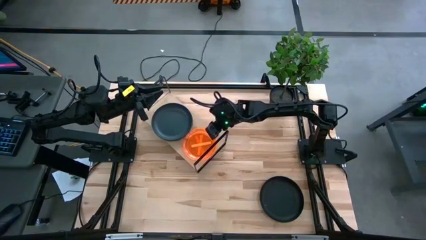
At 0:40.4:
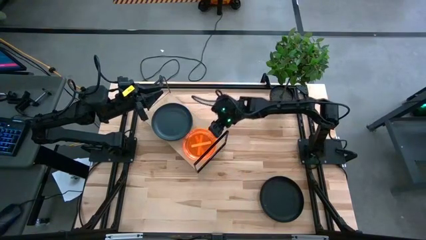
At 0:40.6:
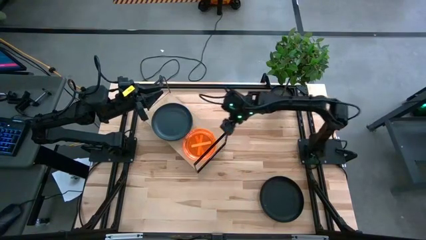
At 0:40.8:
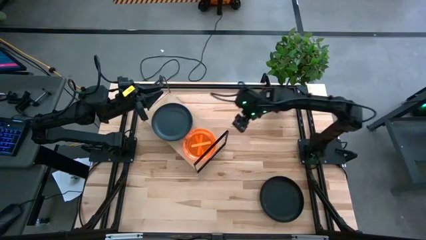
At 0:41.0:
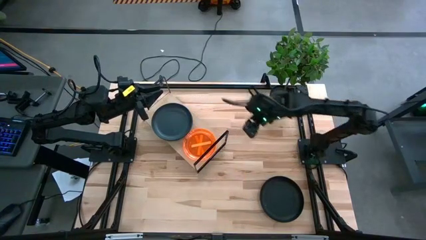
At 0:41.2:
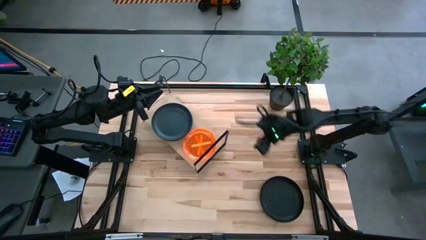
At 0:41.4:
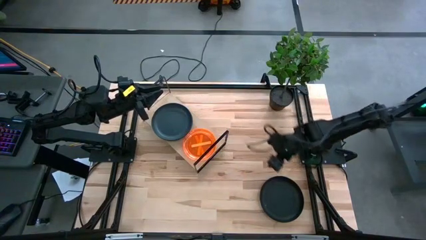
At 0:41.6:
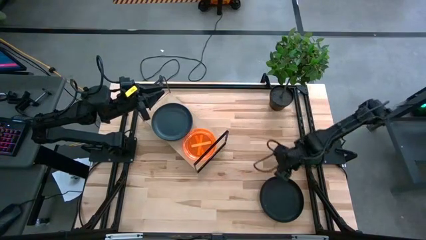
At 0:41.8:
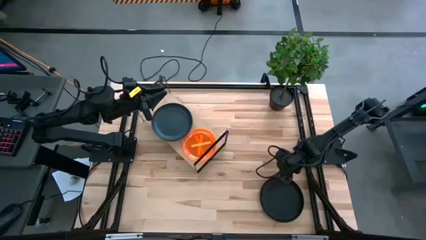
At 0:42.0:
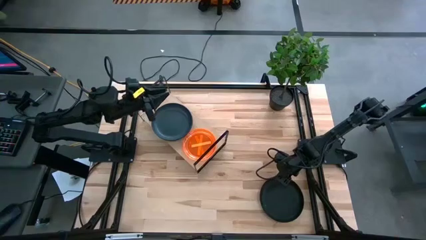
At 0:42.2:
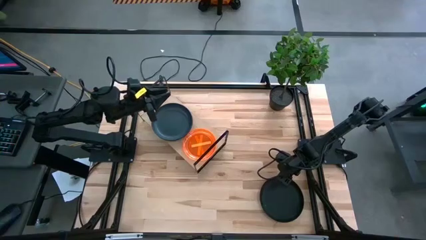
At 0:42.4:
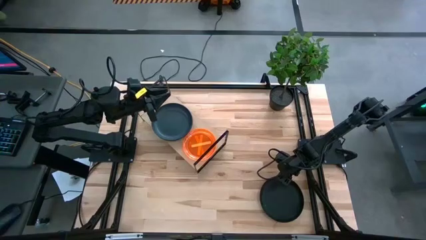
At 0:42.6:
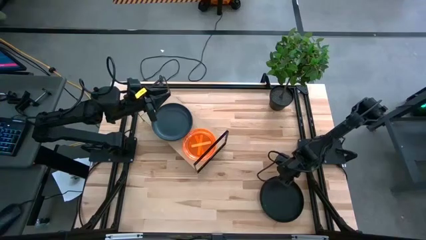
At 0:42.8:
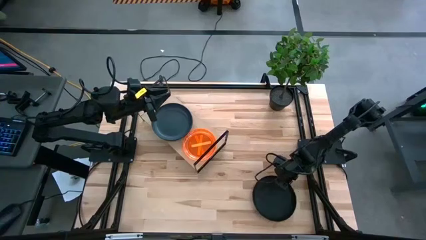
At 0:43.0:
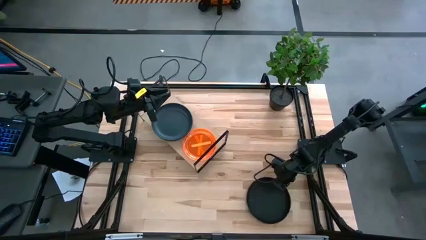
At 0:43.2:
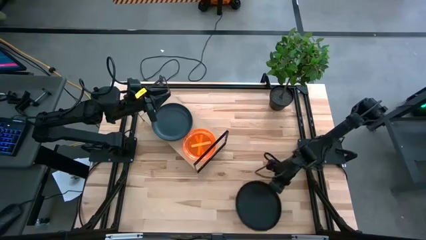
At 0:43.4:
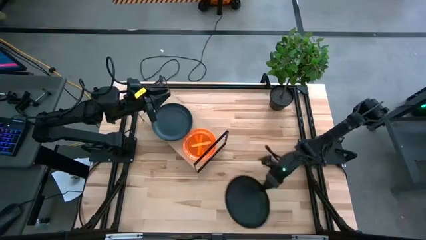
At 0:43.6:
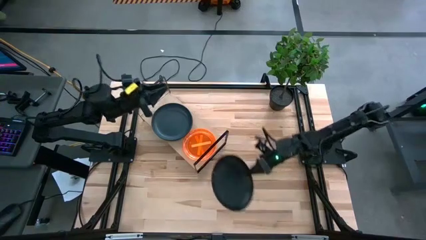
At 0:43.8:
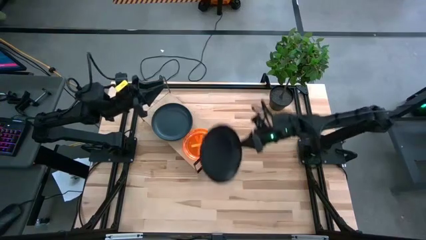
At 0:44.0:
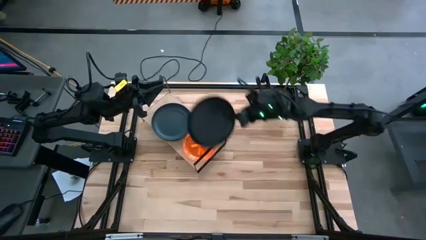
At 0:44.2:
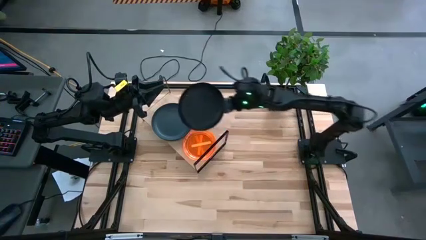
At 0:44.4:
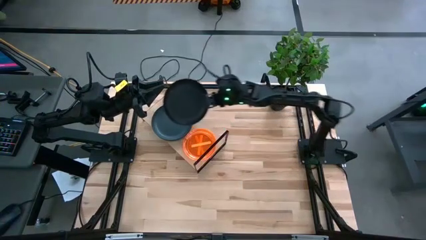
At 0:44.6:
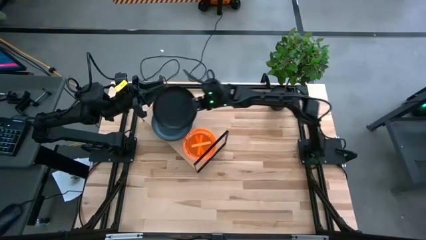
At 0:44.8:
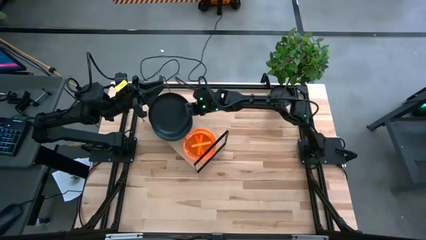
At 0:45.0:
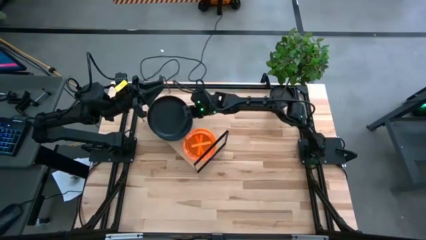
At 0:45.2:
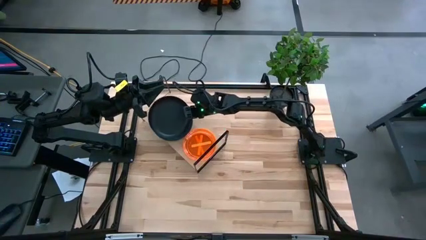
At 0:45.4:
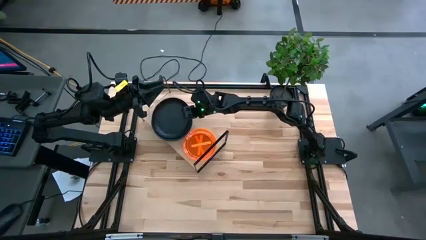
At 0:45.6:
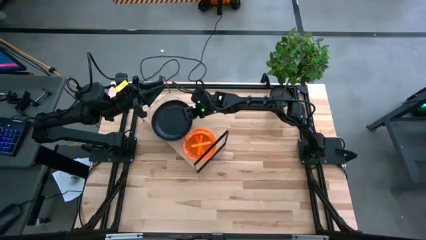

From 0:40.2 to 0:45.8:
Task: Place and stack plates onto a shelf
Stack the black plate on top of the black plate on the shelf

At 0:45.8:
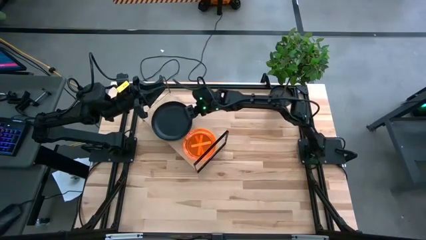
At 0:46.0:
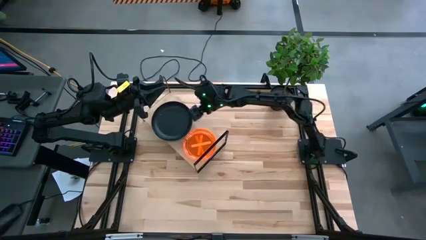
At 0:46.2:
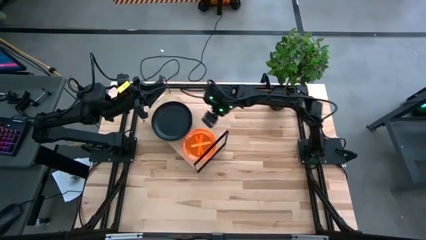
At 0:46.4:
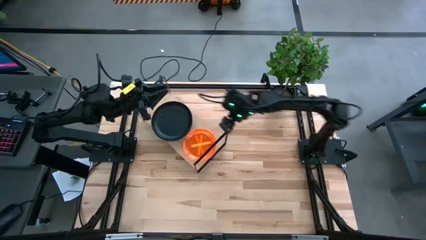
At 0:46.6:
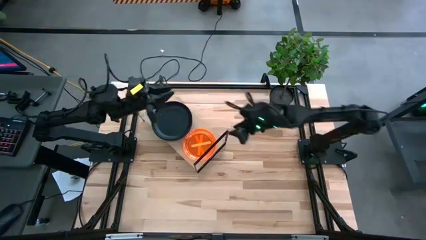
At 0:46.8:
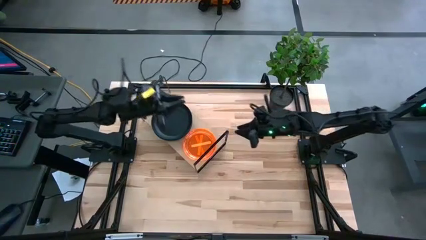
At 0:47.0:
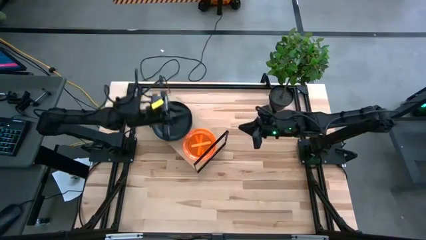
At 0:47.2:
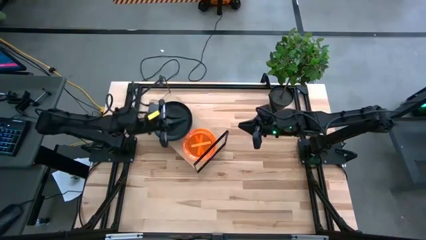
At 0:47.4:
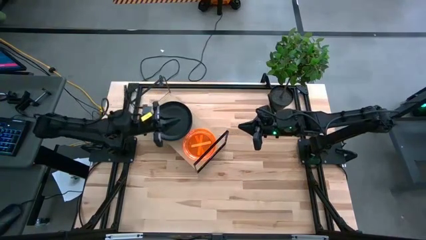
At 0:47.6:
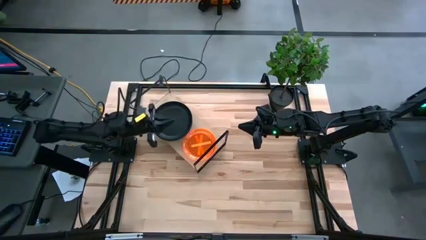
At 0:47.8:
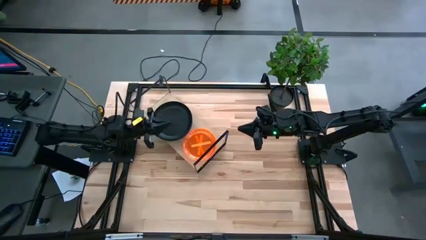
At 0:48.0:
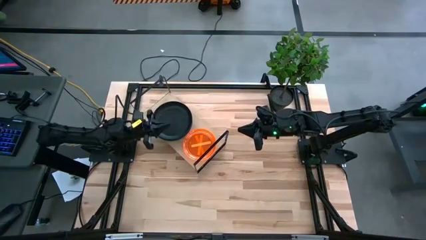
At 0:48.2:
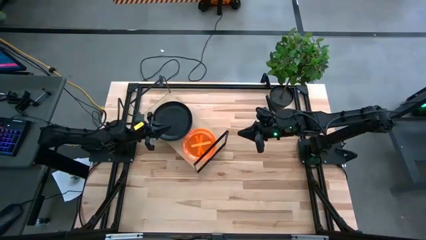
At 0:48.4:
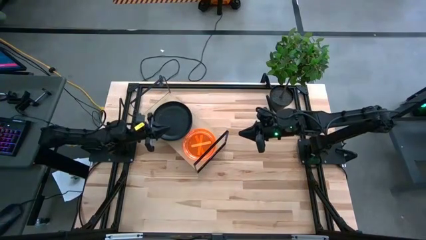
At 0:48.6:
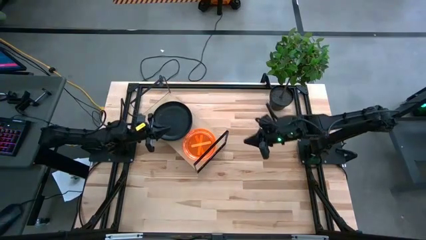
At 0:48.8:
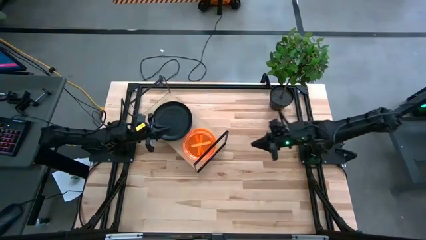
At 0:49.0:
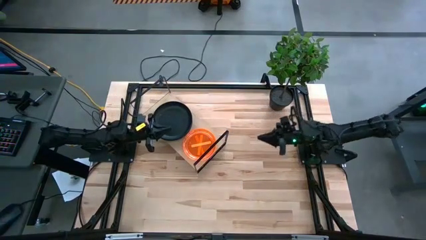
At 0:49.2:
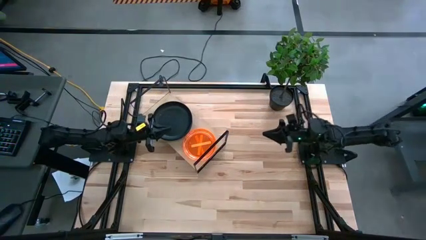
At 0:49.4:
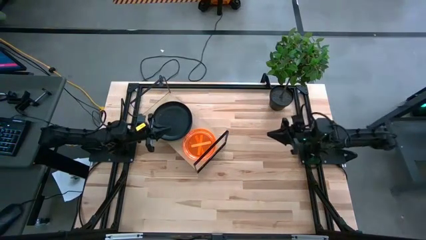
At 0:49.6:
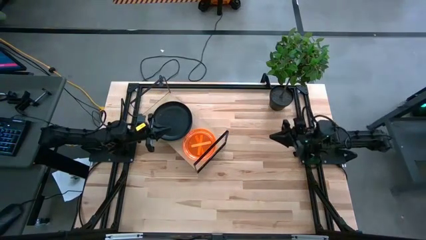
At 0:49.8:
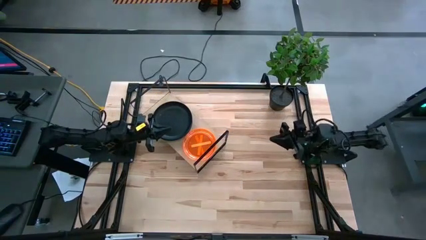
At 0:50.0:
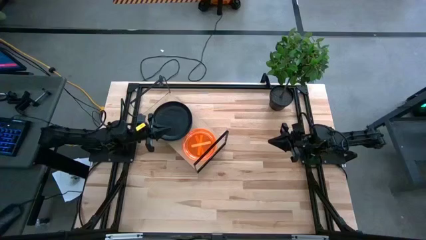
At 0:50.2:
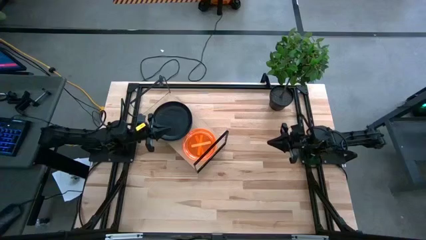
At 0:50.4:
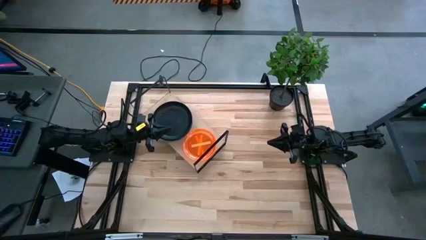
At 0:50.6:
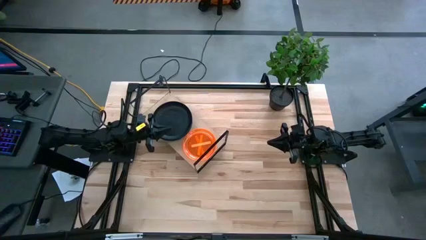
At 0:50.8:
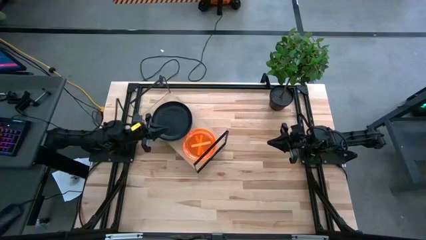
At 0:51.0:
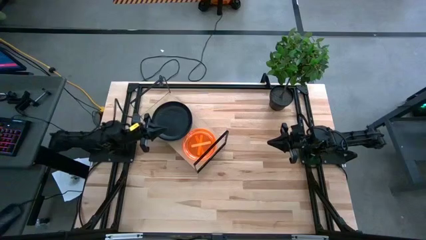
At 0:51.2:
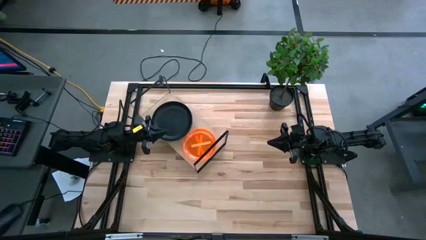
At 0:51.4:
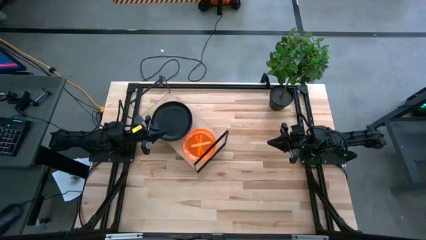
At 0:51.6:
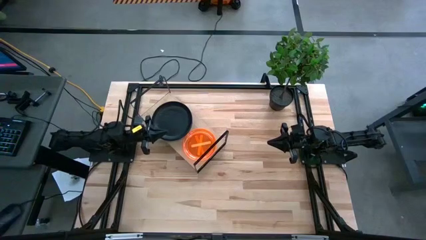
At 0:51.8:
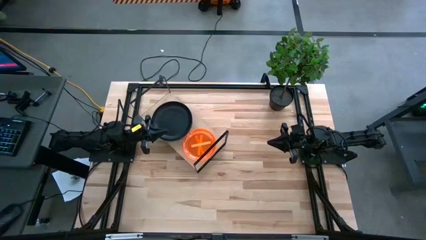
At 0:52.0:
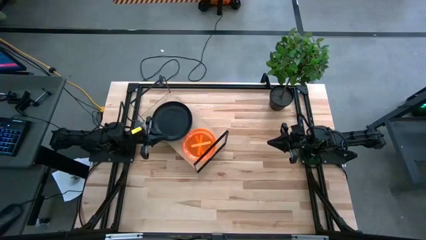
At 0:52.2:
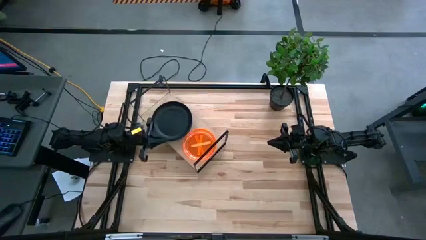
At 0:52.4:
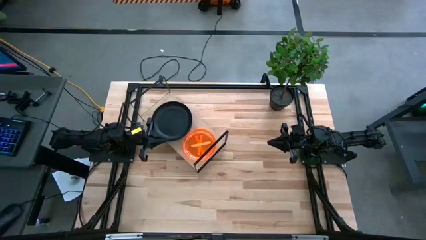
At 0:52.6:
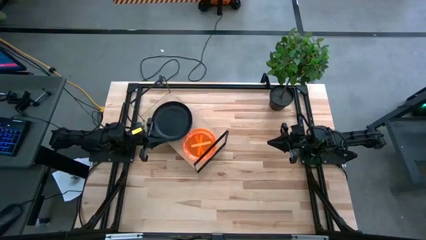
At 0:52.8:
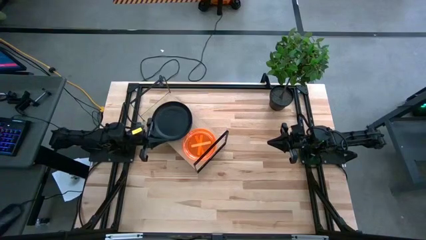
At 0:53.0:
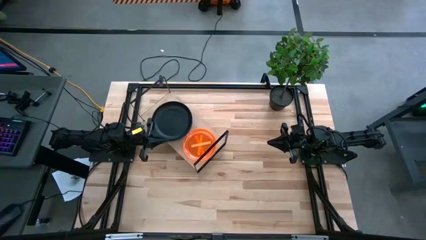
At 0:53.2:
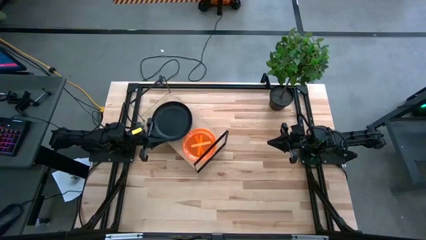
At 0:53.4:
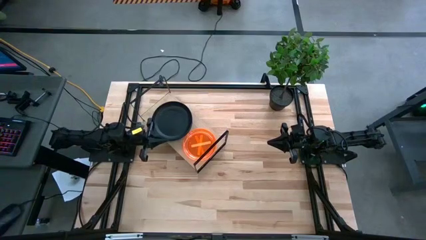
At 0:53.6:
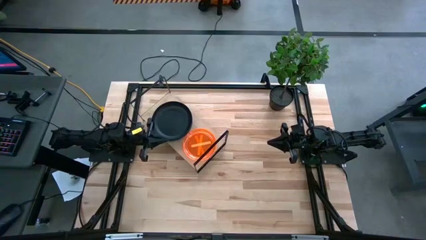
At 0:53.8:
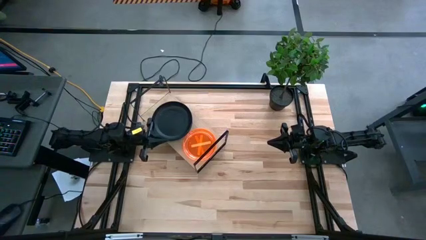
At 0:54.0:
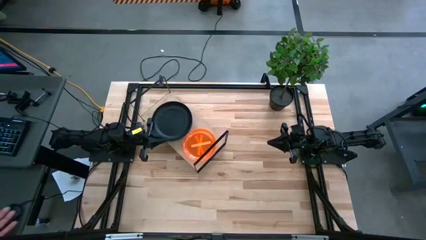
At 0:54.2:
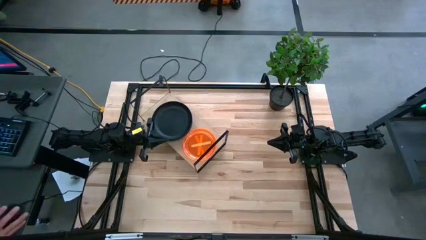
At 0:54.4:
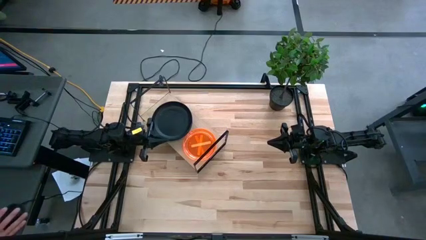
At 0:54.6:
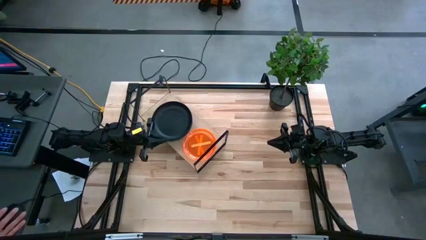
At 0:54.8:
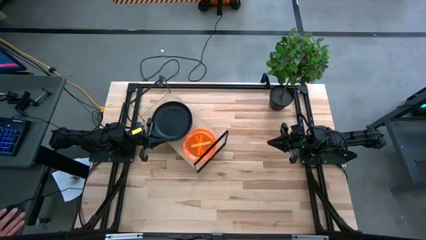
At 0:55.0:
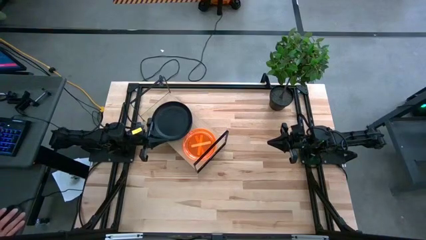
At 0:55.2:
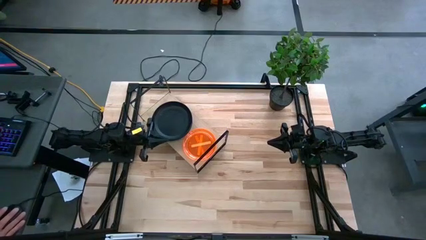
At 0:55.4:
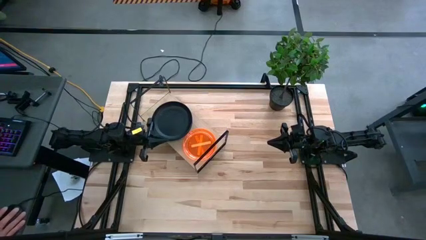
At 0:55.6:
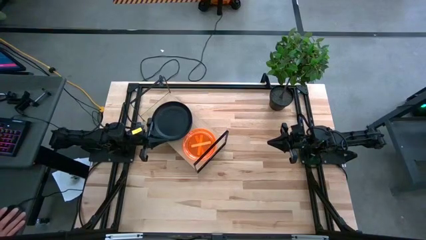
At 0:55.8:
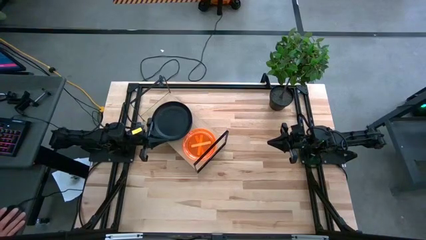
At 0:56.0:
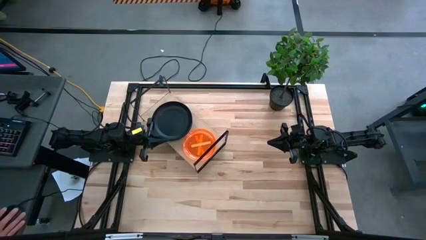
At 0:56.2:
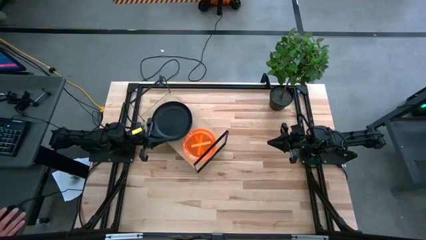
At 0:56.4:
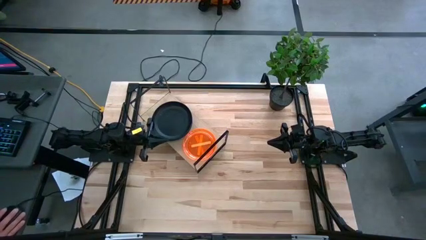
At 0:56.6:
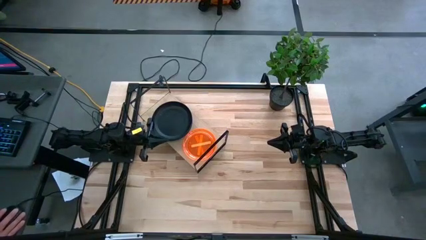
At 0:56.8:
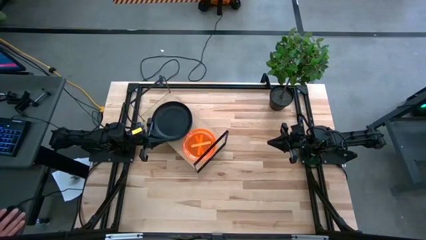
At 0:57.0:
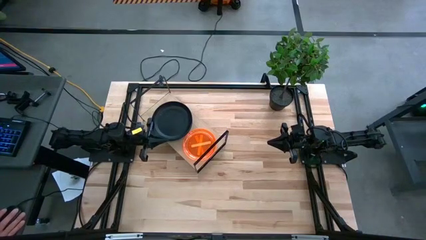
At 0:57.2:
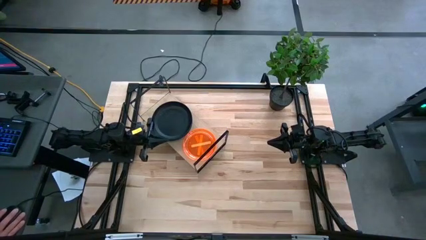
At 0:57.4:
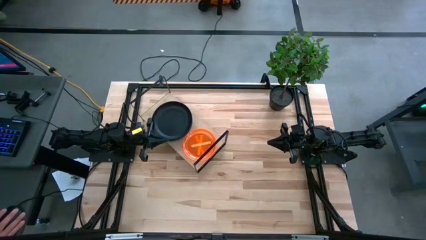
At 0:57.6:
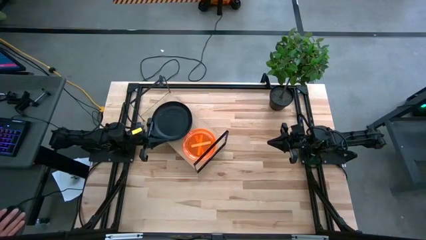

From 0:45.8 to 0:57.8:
Return to Home Position
